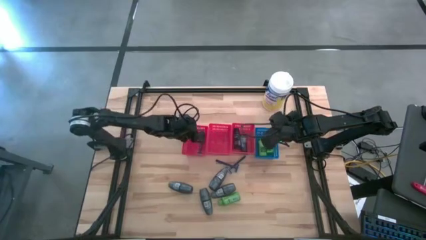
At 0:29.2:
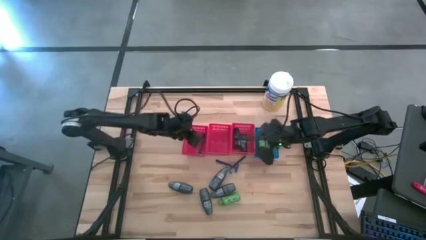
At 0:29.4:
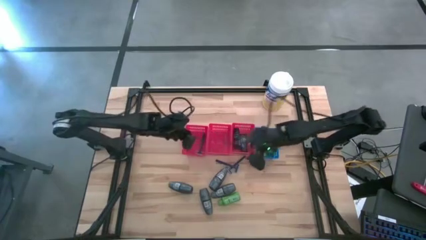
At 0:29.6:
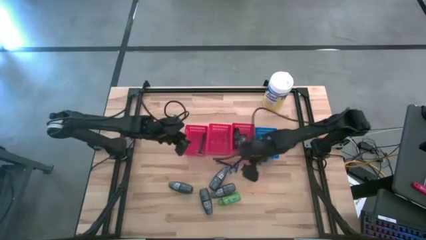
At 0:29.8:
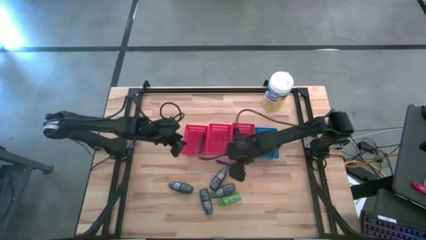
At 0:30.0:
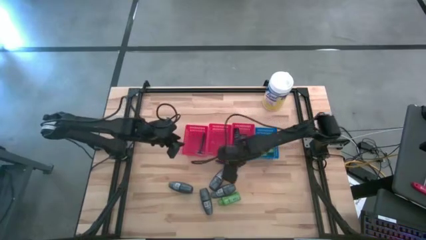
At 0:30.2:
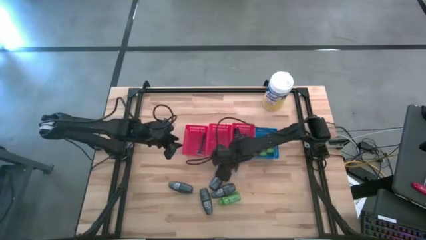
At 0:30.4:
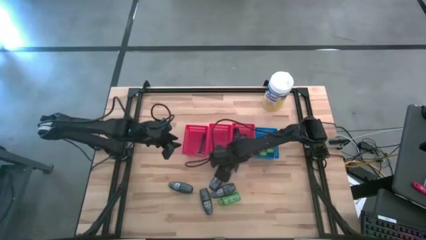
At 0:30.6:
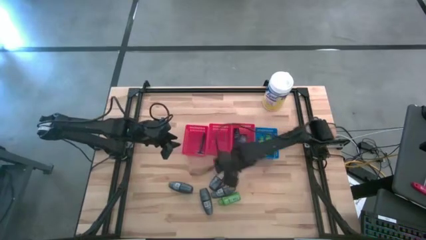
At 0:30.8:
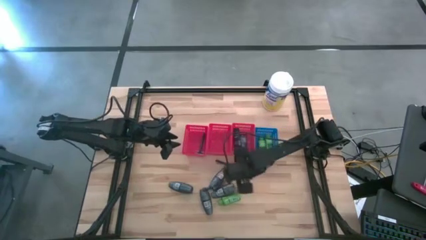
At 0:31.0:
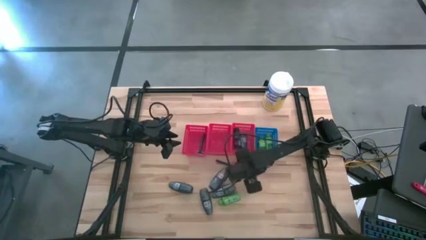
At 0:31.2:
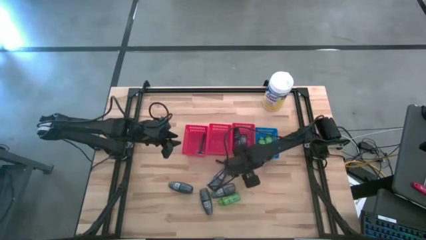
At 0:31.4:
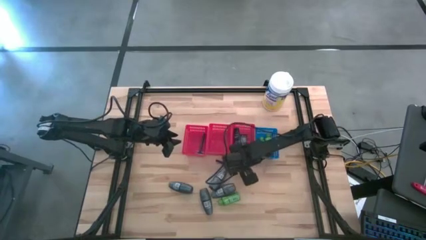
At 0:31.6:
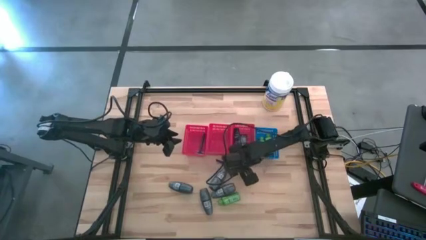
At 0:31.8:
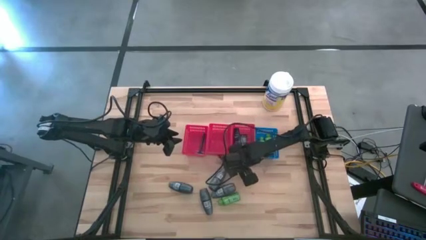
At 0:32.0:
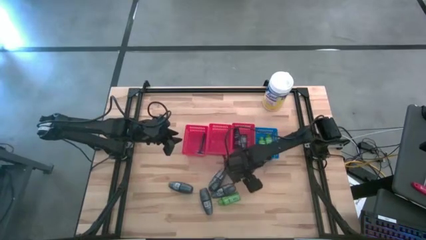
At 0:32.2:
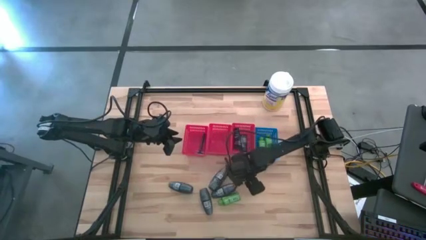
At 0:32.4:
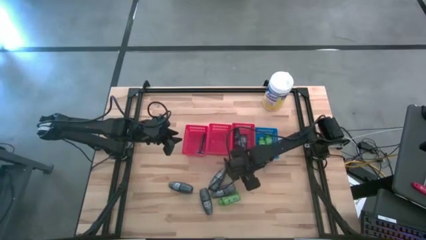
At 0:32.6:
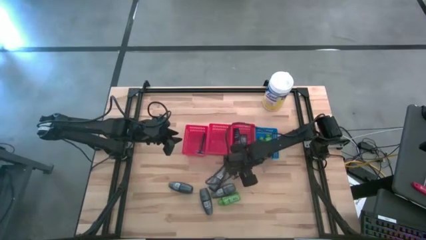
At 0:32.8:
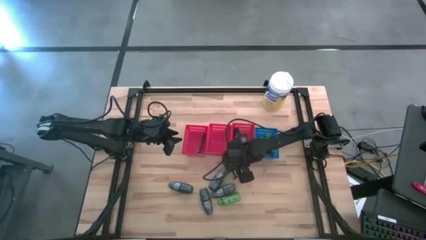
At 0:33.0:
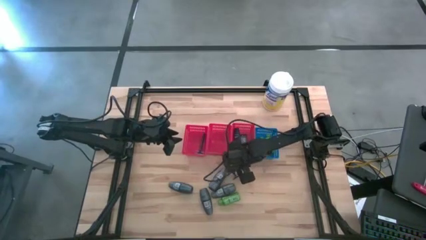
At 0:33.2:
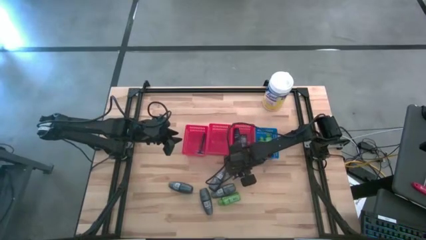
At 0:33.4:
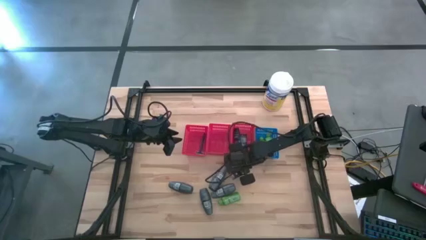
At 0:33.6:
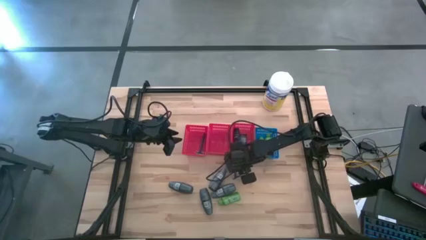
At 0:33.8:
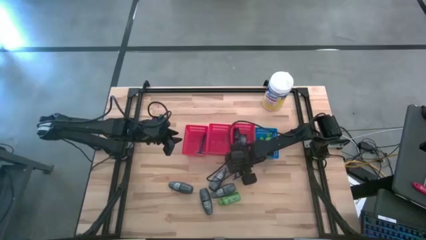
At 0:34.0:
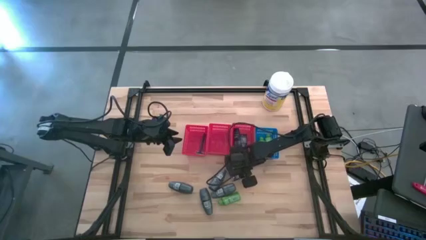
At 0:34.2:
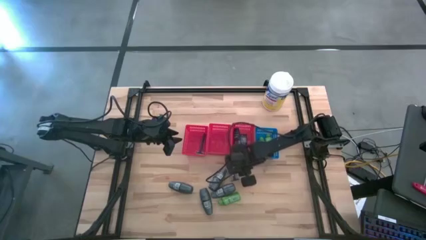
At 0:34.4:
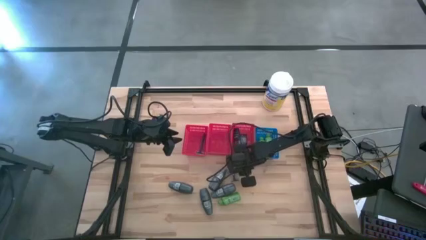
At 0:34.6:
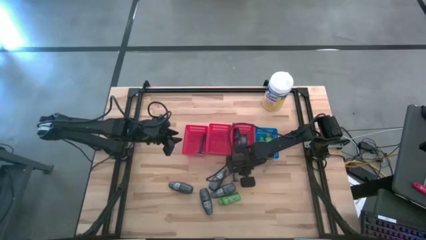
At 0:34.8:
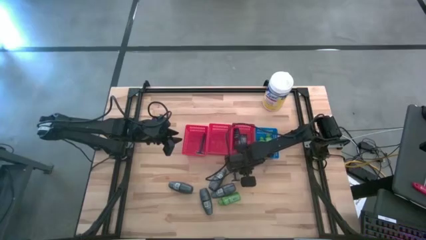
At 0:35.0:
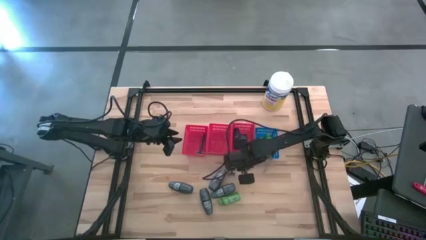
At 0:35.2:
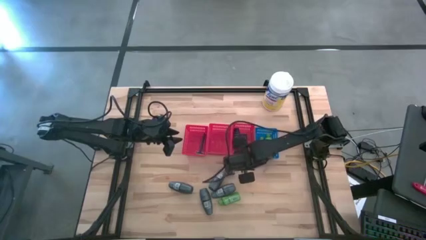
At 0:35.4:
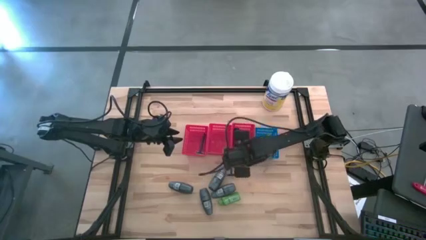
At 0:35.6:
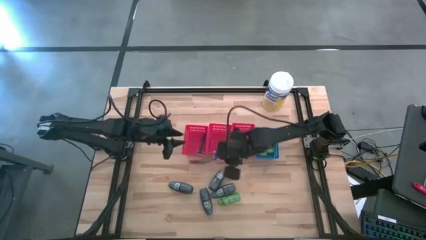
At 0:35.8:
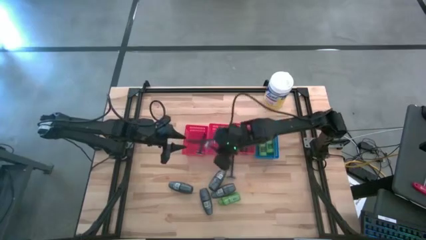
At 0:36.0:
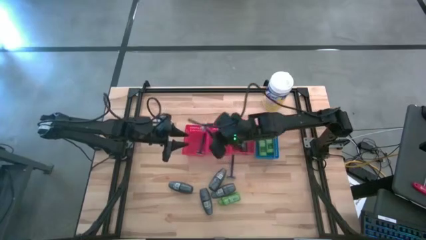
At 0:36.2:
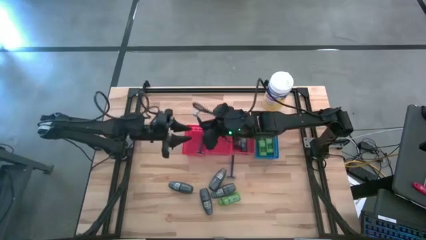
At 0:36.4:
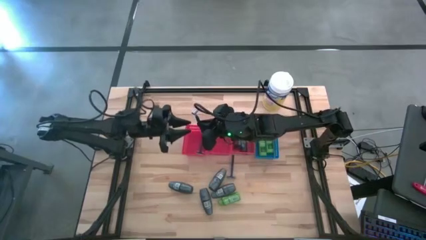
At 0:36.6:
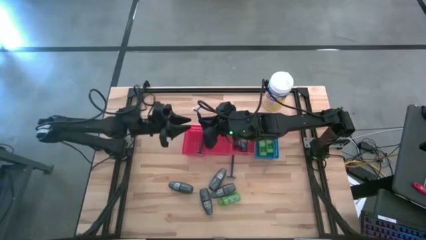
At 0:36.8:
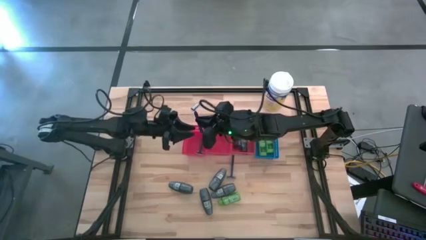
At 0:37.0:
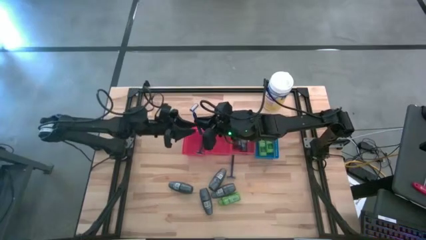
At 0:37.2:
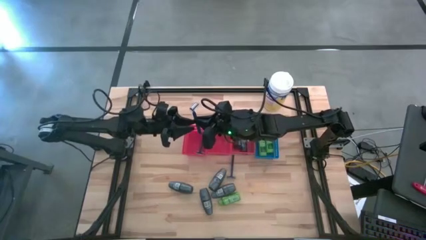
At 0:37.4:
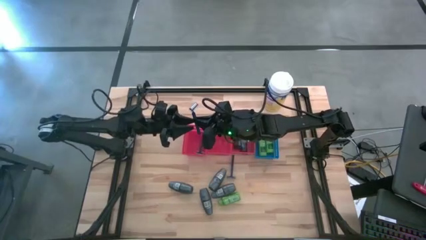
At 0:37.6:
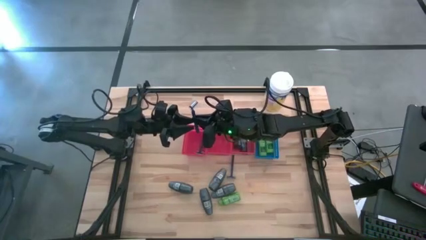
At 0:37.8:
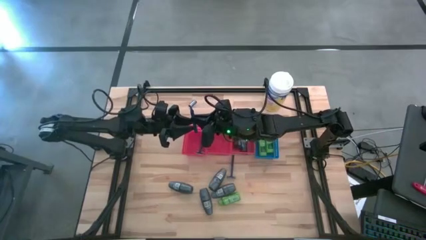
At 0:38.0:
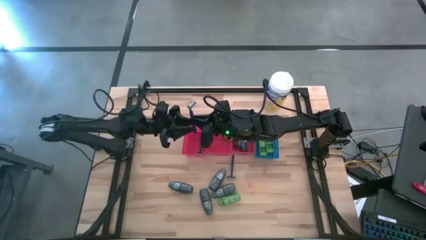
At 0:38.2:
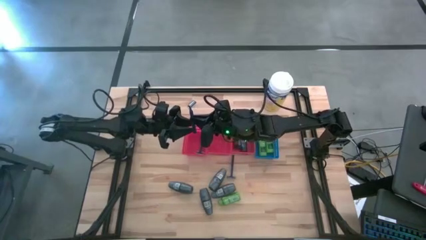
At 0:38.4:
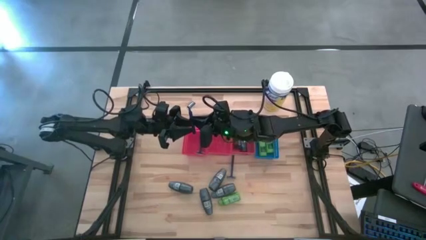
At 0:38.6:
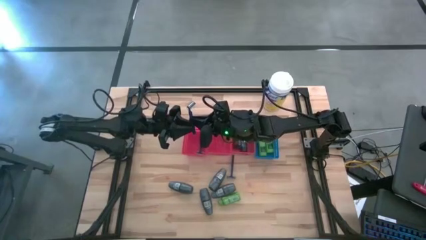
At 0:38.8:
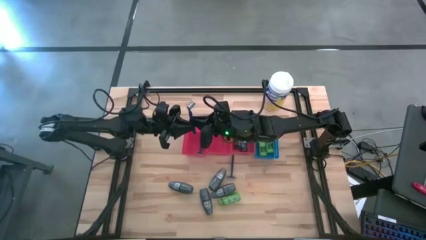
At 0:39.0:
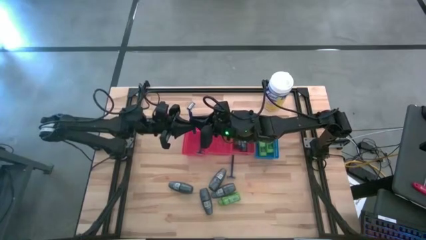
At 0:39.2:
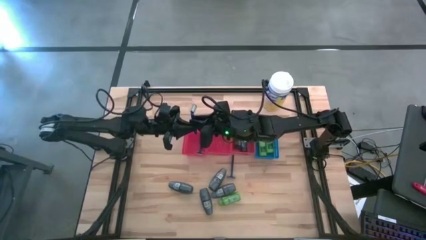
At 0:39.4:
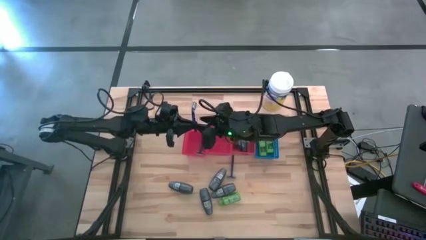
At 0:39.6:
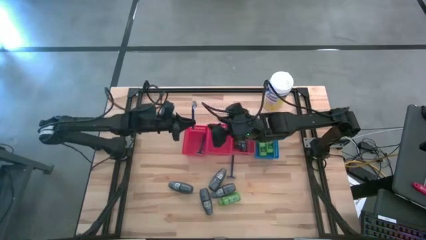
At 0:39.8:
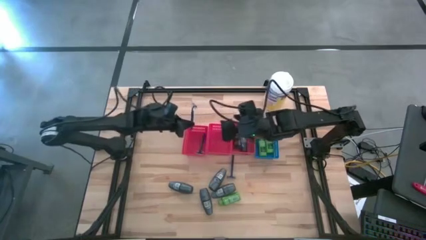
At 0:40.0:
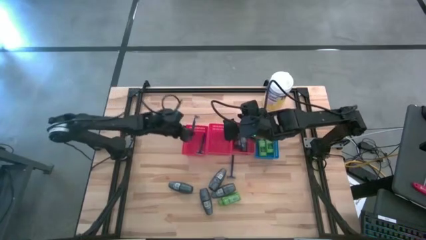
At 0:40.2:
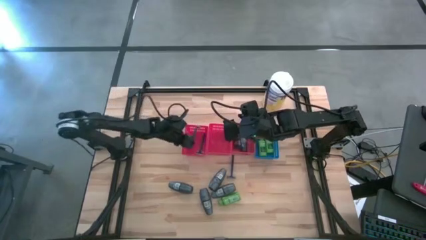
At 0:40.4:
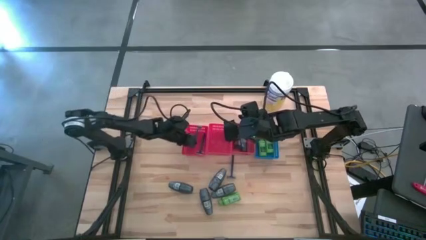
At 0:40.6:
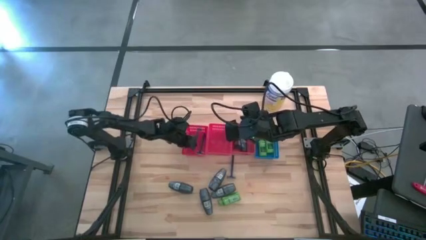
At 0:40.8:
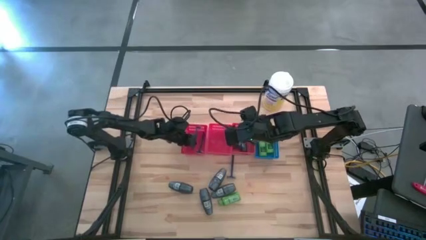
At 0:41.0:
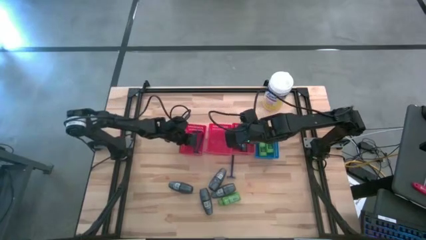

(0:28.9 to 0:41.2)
Task: Pick & Place Travel size toiletries
Put the razor into the left red bin

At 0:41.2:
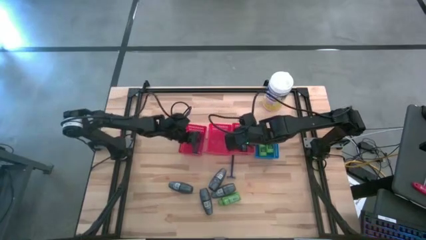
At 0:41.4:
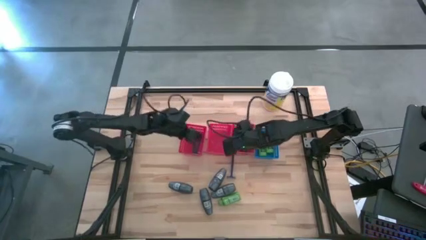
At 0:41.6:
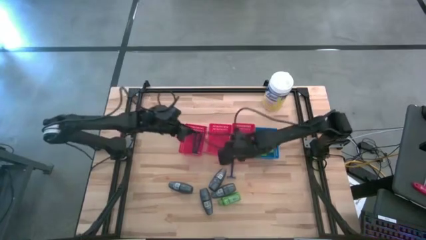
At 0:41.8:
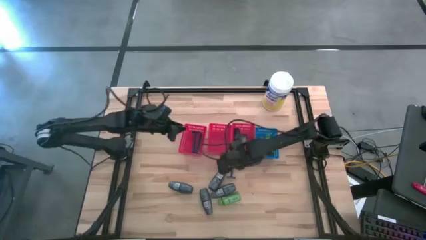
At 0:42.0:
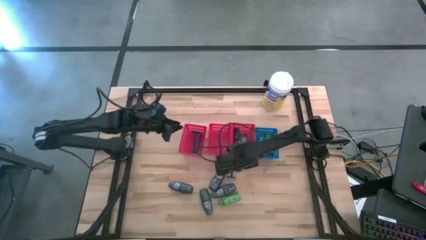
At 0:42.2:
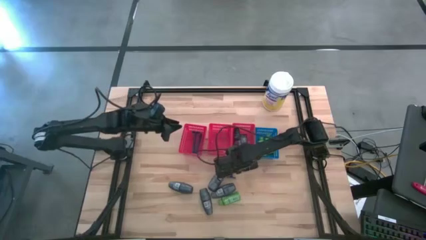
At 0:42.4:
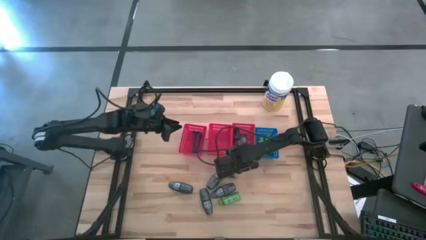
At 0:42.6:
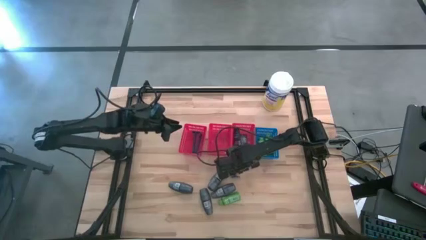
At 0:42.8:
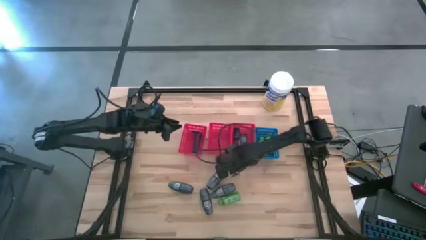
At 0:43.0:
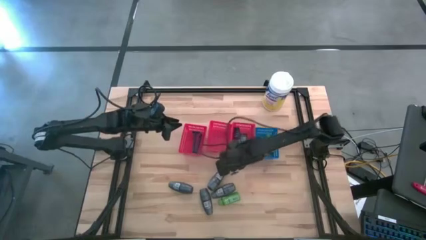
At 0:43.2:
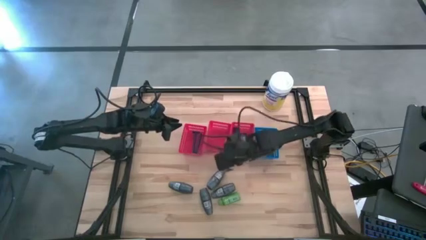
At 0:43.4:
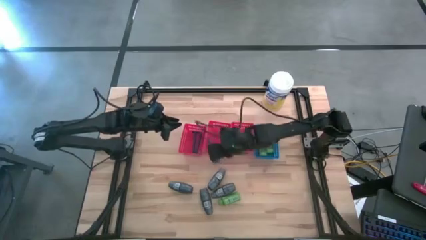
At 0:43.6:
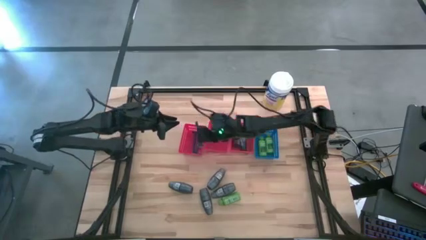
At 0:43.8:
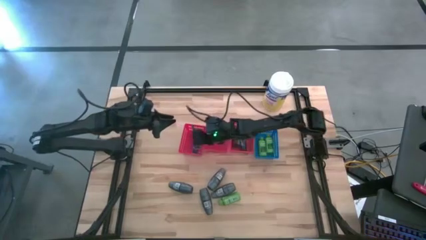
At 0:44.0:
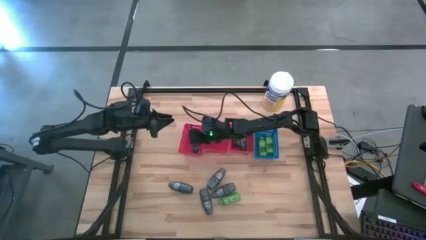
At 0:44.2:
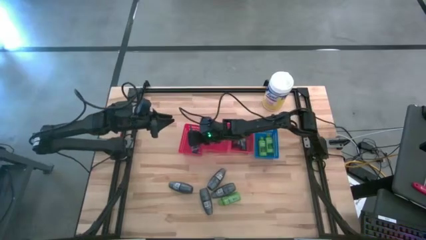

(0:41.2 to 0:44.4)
Put the razor into the left red bin
